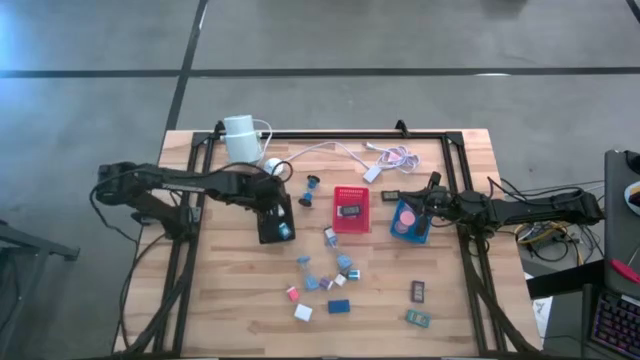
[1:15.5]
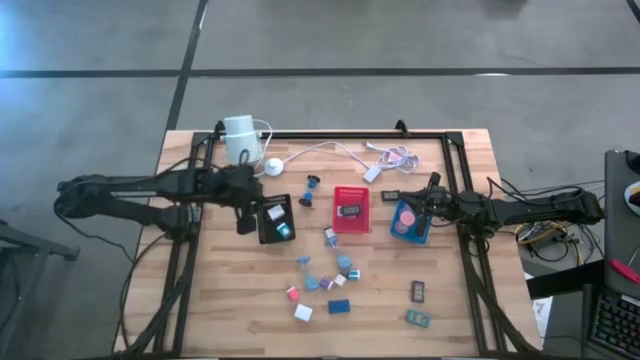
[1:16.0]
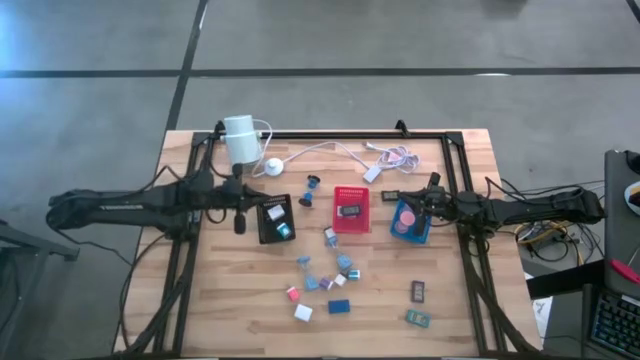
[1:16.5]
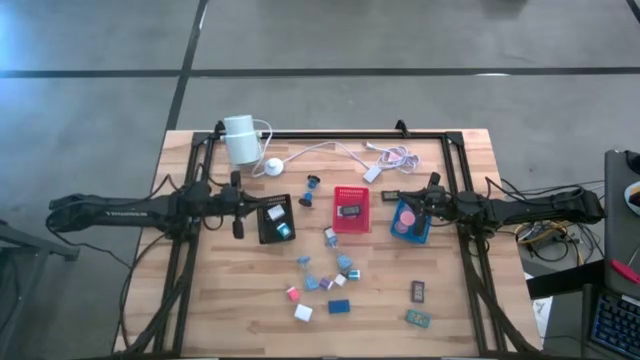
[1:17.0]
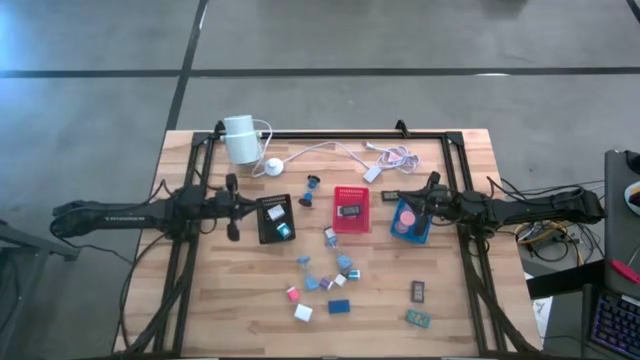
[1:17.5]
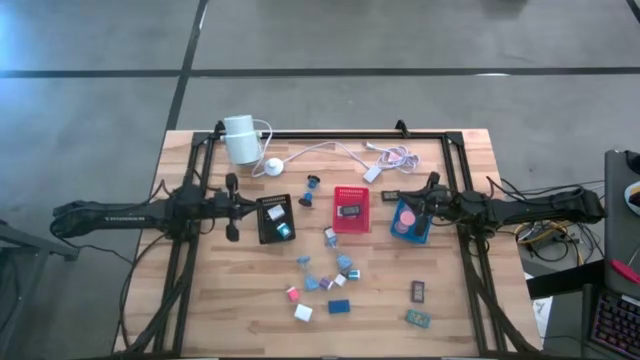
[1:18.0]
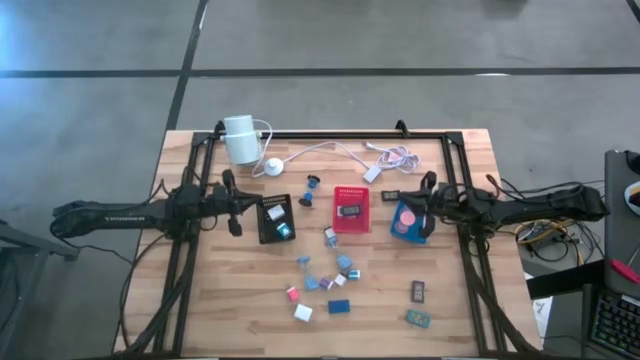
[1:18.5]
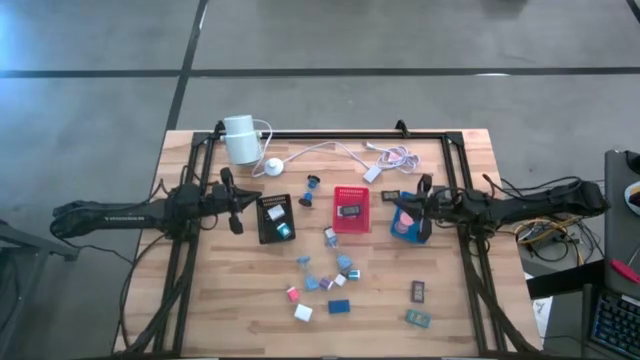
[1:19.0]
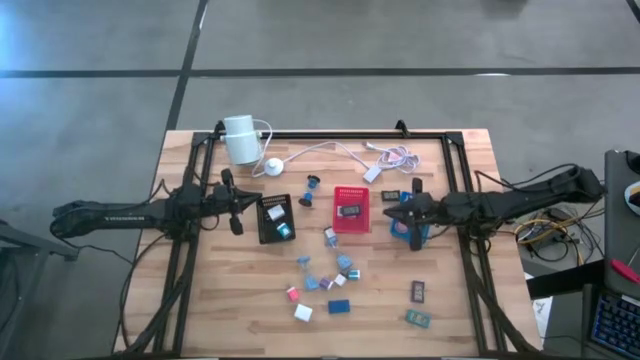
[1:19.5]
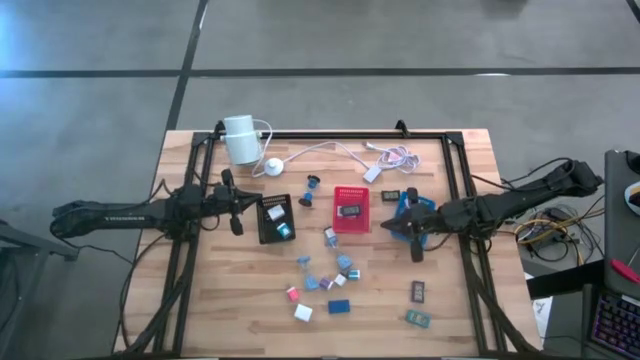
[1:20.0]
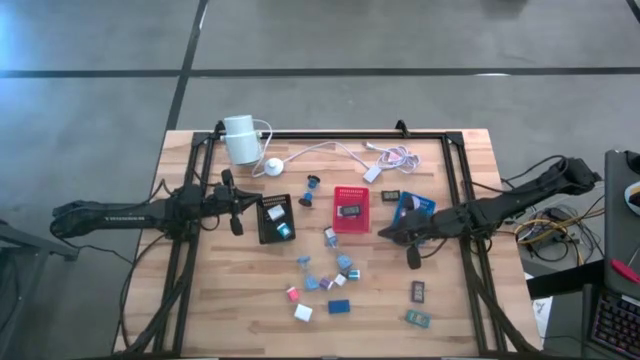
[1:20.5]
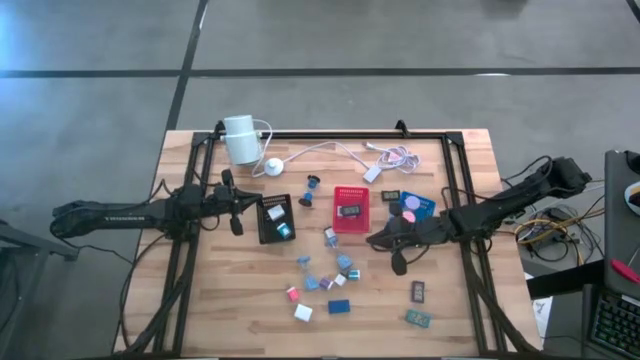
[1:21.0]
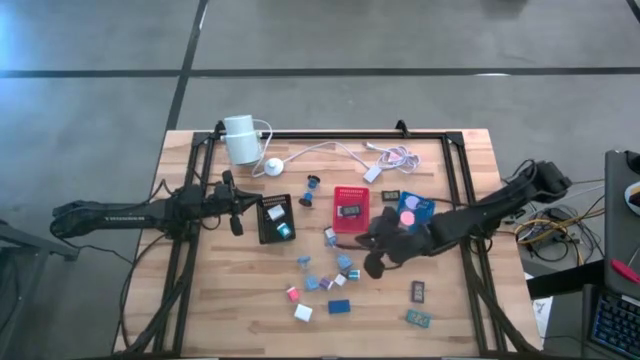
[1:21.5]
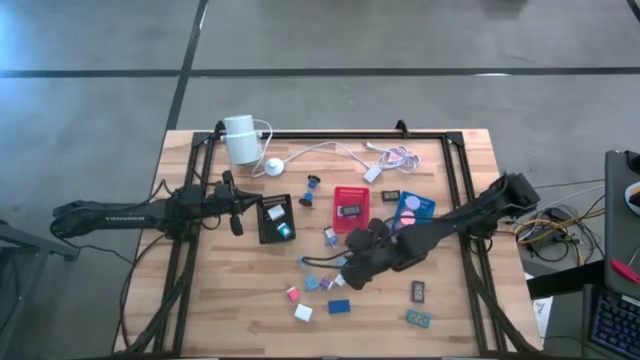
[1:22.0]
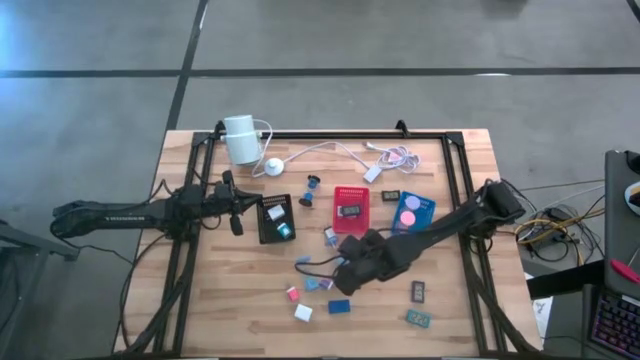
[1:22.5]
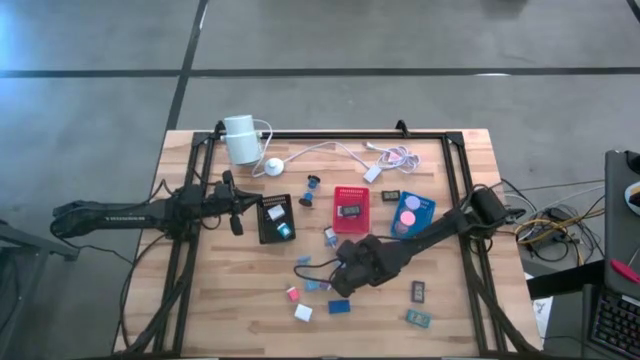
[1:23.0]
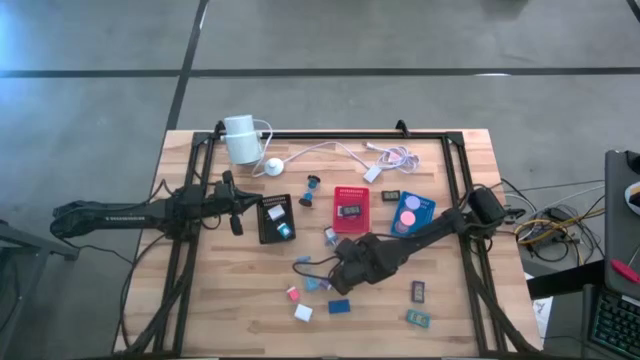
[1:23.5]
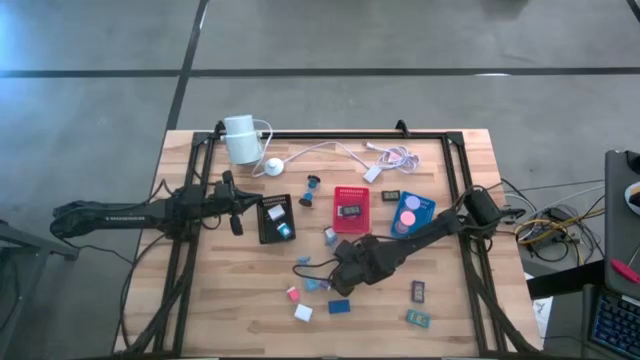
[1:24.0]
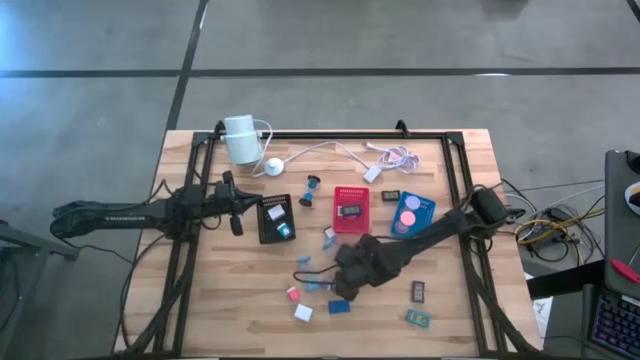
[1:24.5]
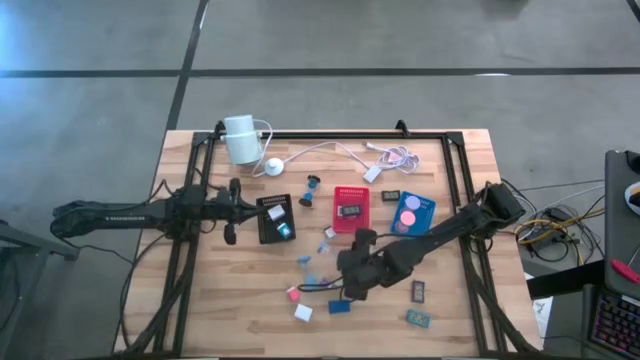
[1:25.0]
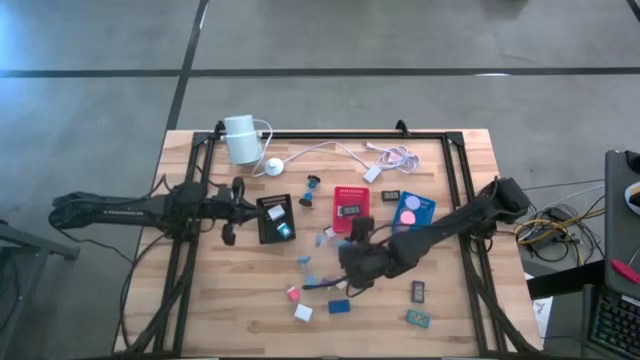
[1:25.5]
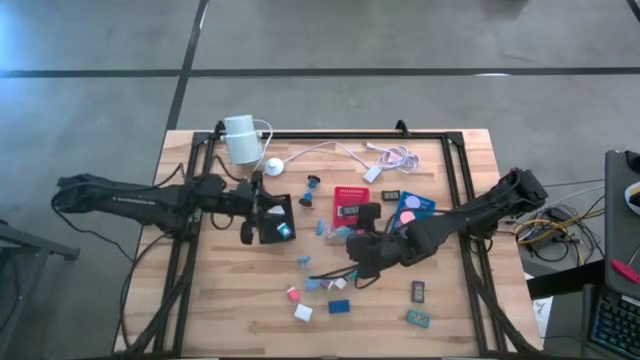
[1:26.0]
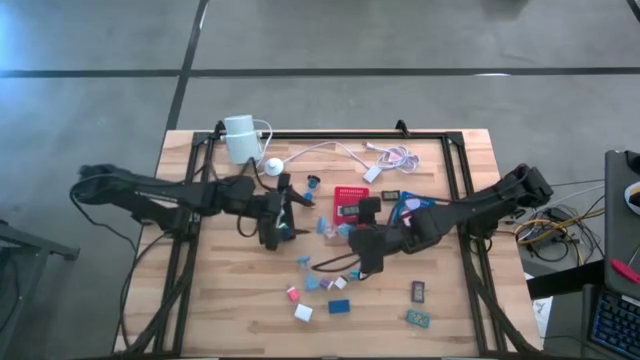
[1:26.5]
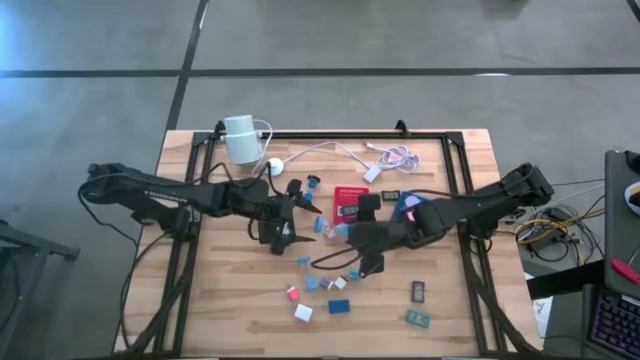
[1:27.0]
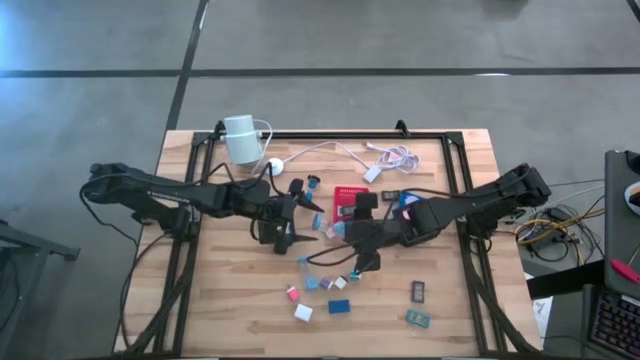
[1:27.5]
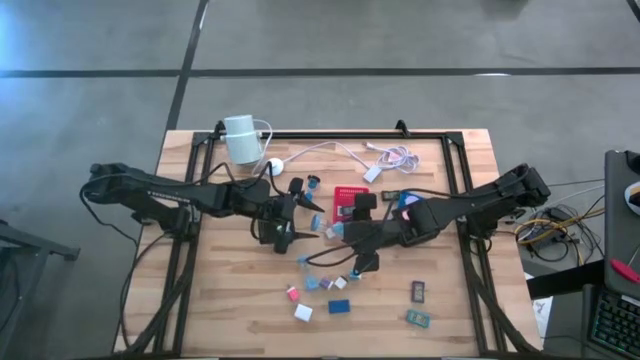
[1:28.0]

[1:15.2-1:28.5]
Task: Pick & Place Office items
Put the right light blue hourglass into the blue bin

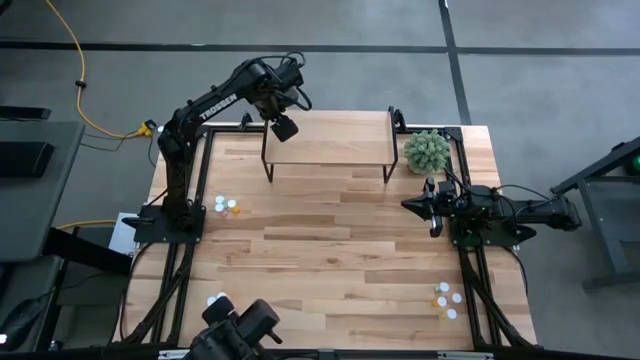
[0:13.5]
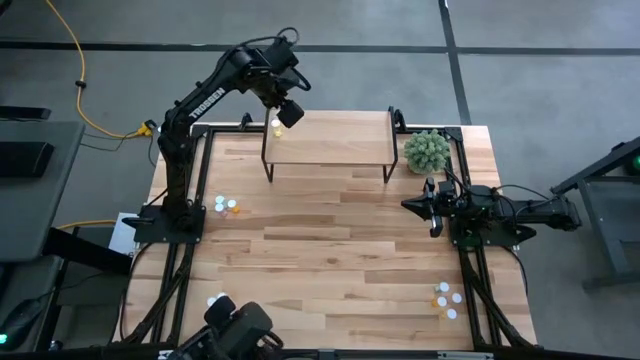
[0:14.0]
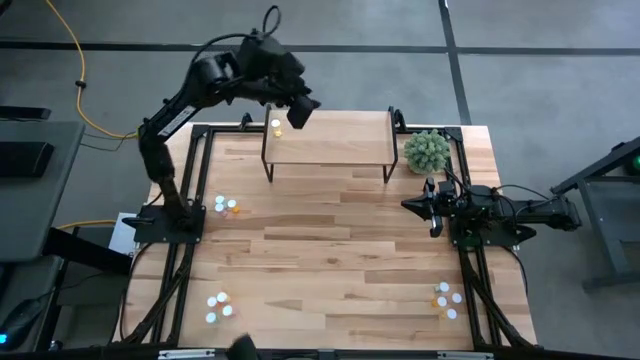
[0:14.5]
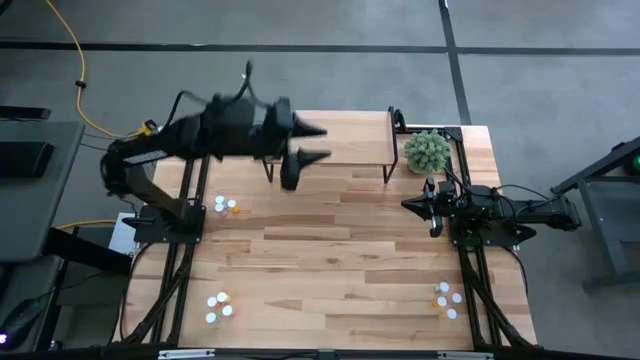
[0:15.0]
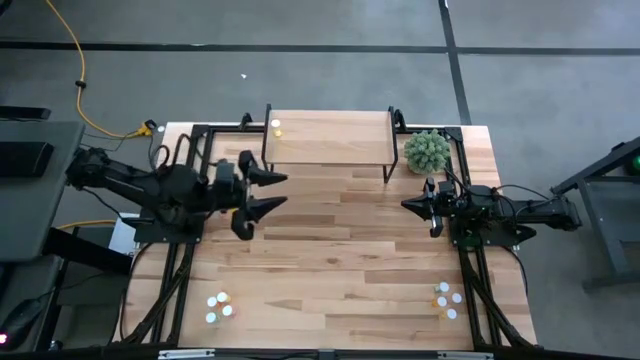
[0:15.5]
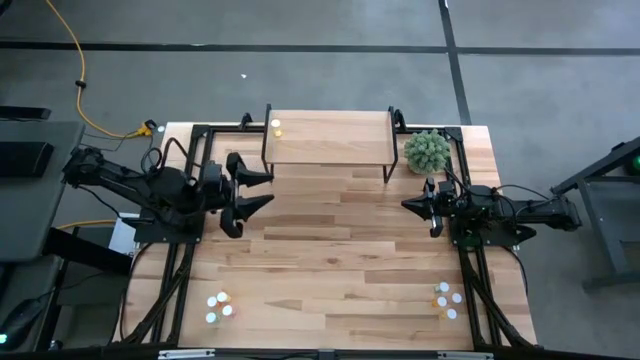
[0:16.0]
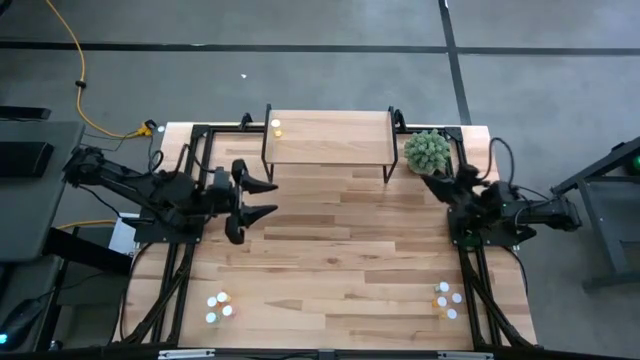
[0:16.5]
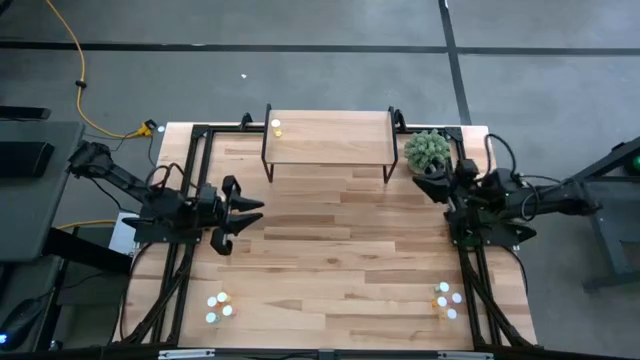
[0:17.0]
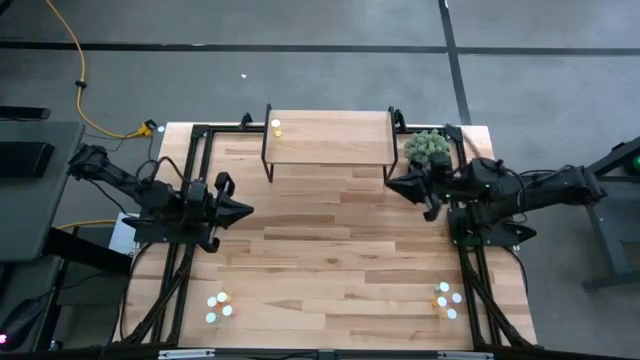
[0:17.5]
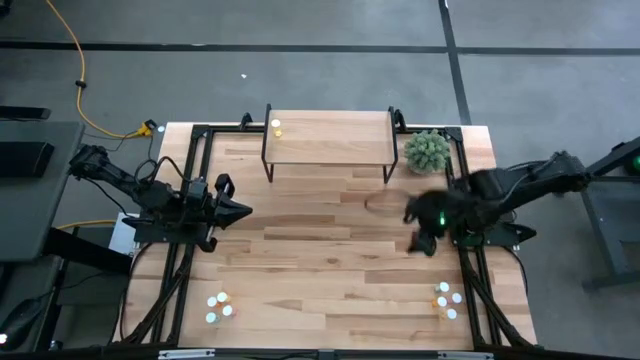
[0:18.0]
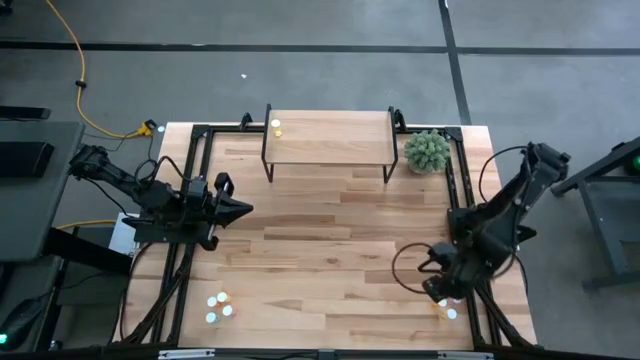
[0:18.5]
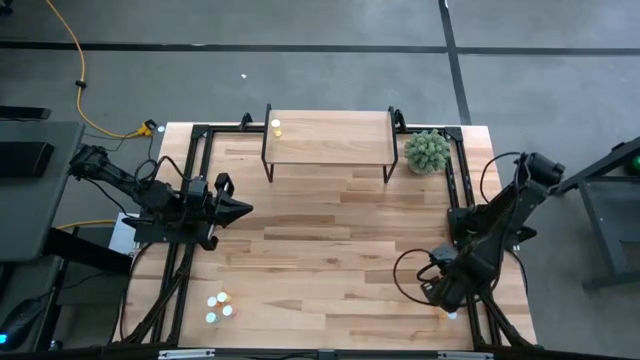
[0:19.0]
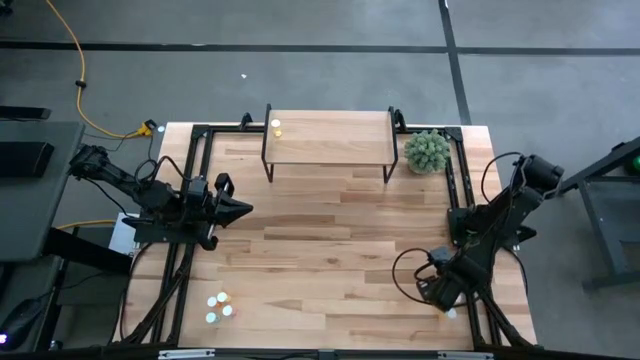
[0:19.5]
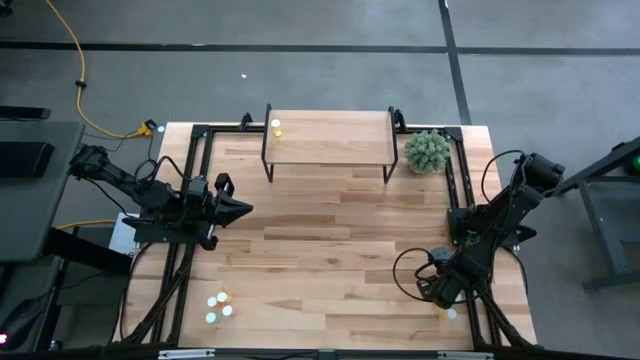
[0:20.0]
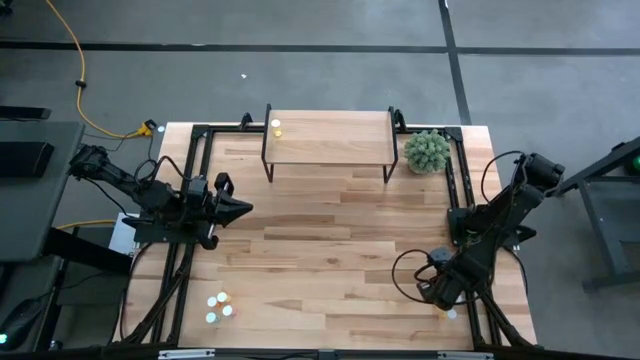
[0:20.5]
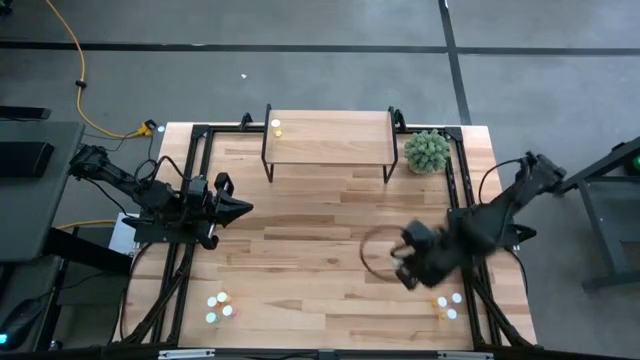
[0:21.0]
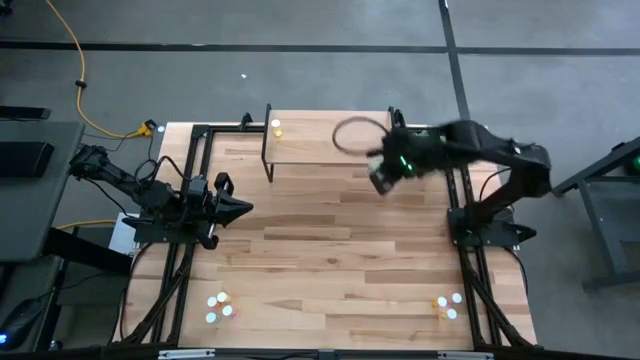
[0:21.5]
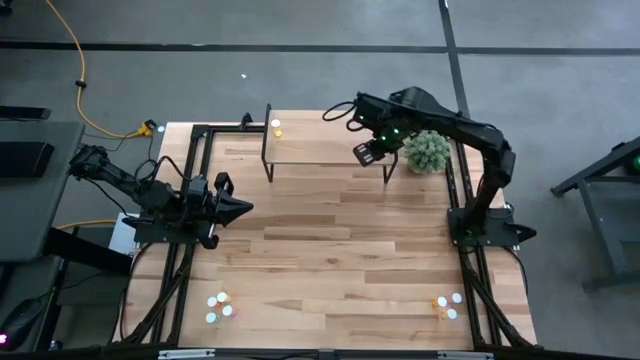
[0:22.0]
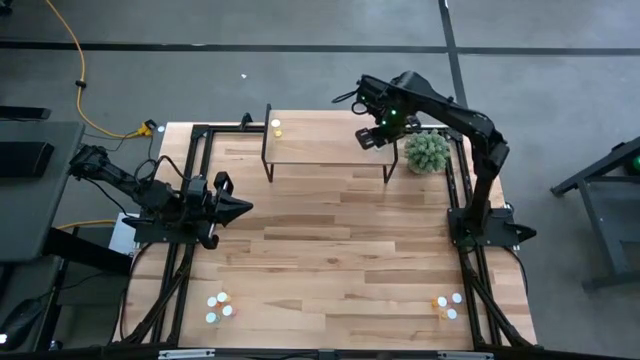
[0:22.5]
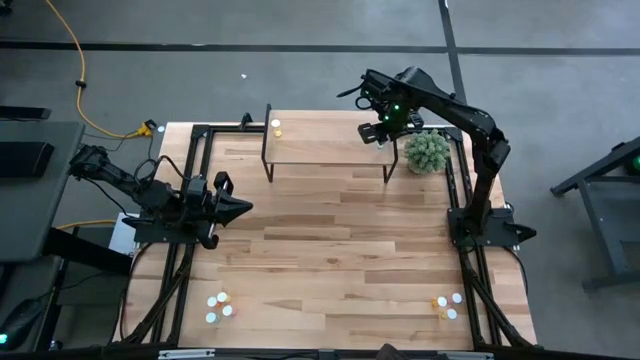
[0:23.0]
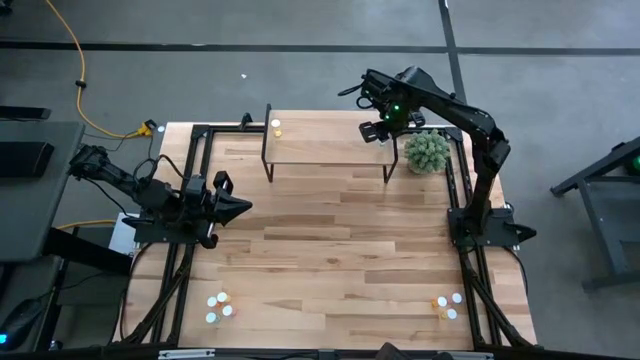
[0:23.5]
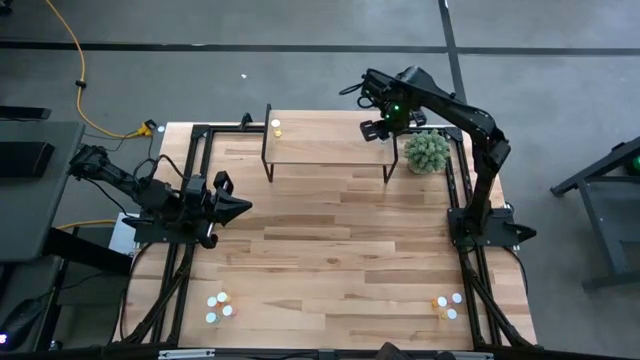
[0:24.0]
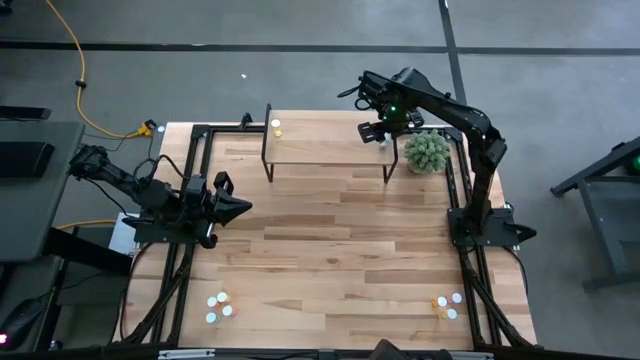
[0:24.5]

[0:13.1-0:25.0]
Task: Pick and place medicine bottles onto shelf by color
Put the bottom right blue pill bottle on the shelf
